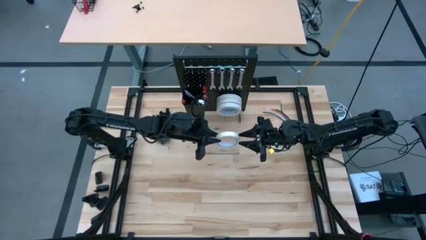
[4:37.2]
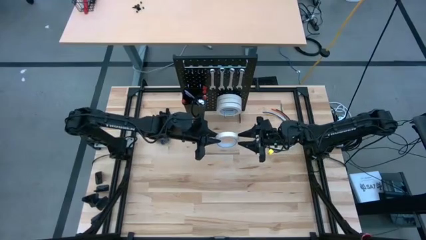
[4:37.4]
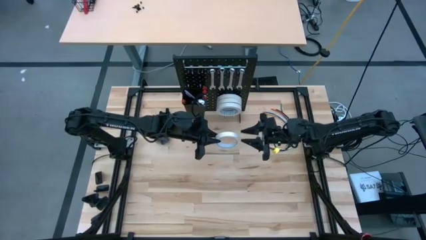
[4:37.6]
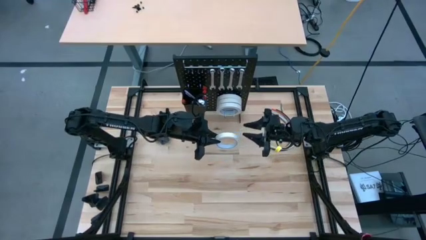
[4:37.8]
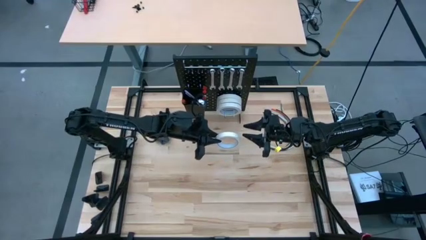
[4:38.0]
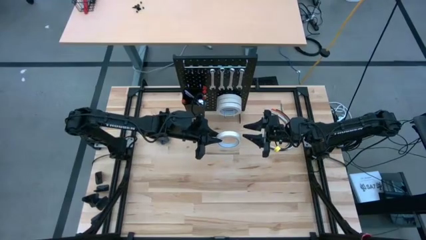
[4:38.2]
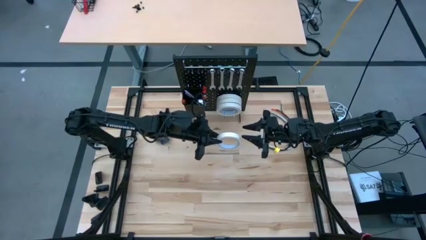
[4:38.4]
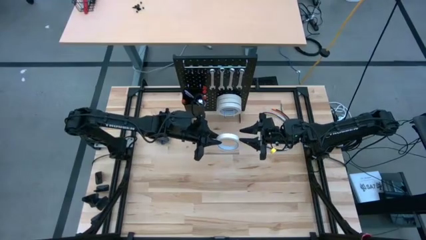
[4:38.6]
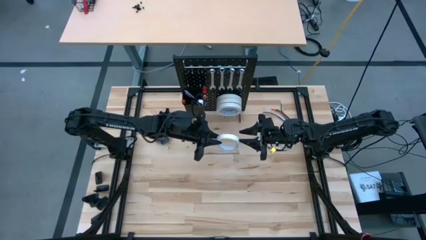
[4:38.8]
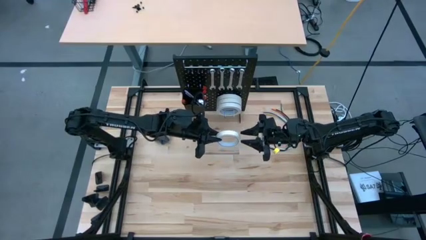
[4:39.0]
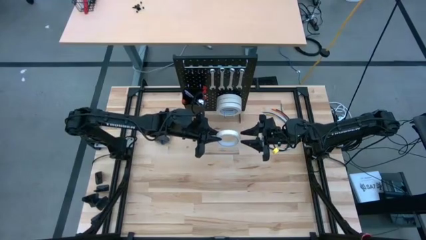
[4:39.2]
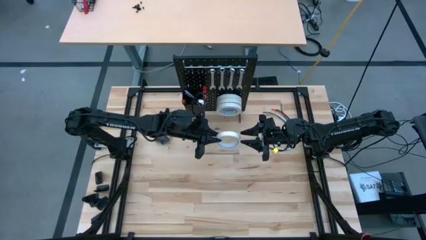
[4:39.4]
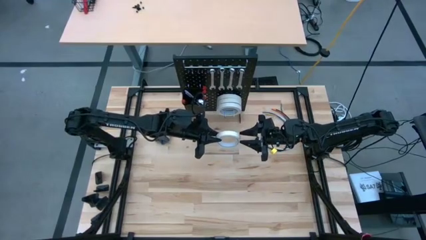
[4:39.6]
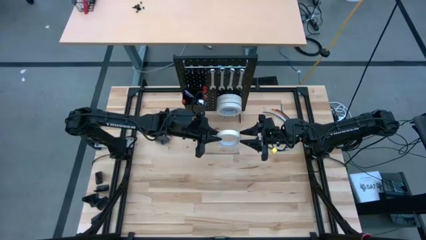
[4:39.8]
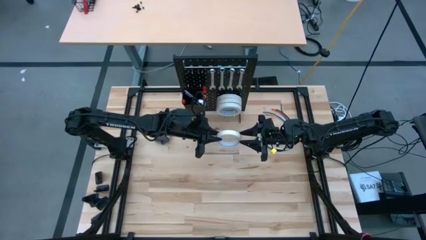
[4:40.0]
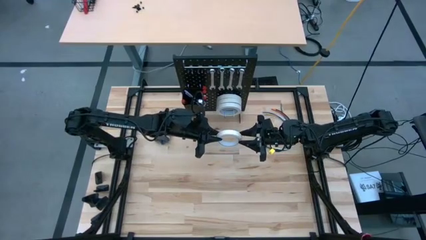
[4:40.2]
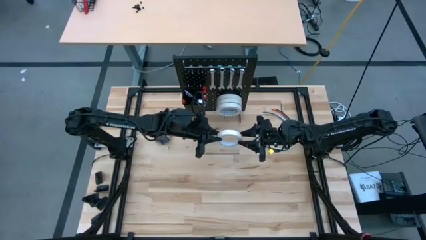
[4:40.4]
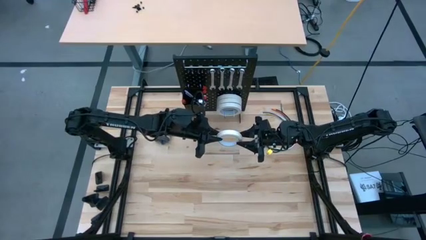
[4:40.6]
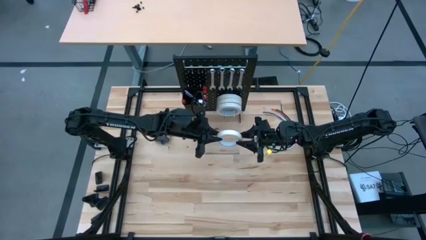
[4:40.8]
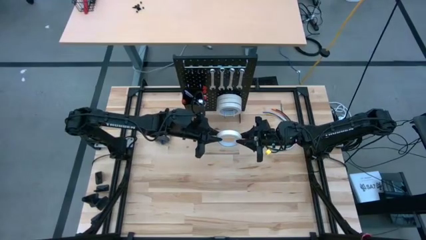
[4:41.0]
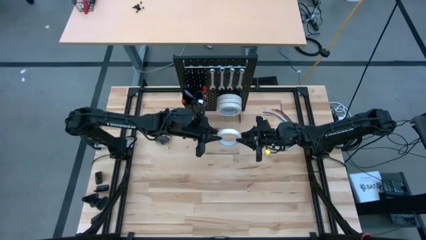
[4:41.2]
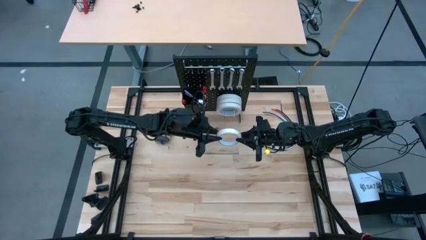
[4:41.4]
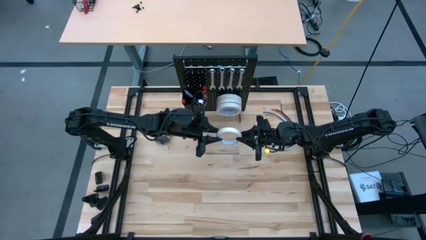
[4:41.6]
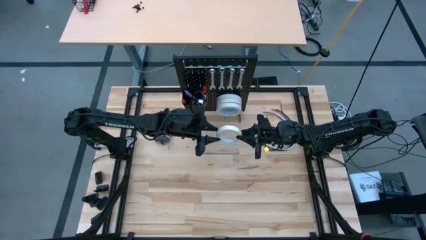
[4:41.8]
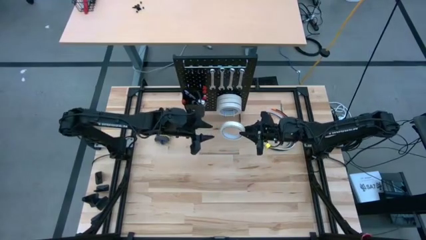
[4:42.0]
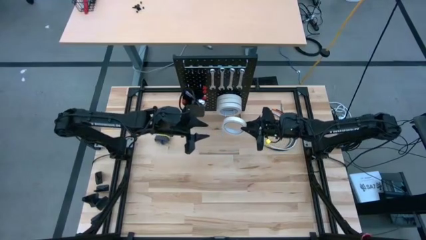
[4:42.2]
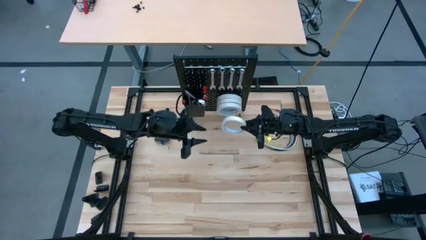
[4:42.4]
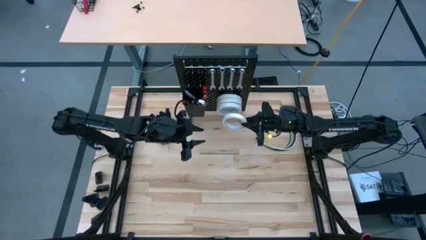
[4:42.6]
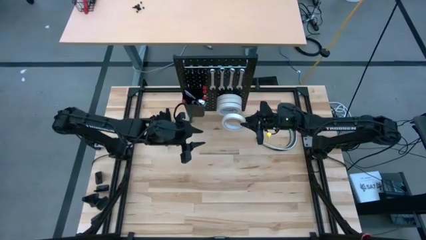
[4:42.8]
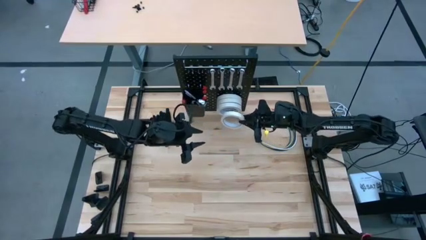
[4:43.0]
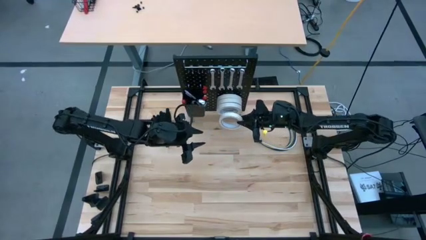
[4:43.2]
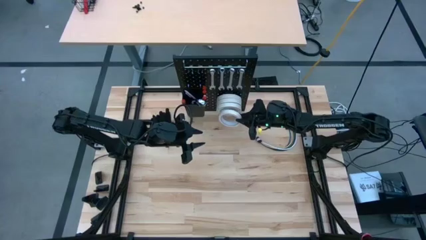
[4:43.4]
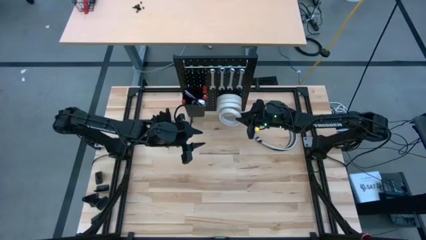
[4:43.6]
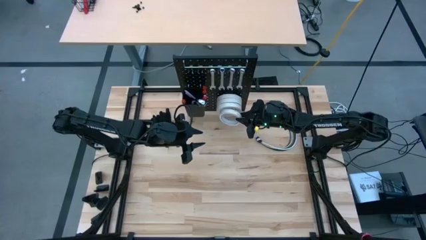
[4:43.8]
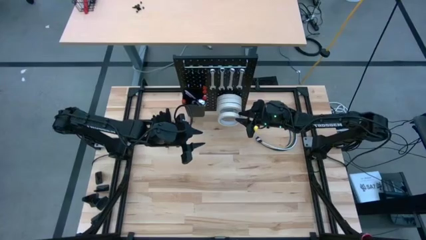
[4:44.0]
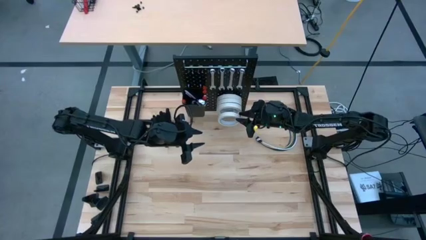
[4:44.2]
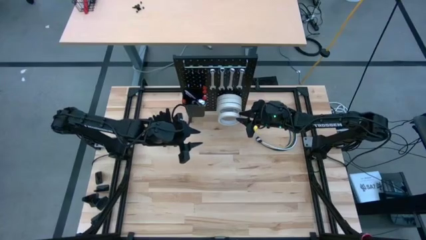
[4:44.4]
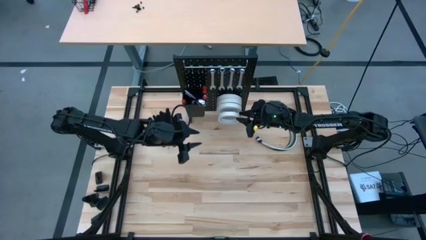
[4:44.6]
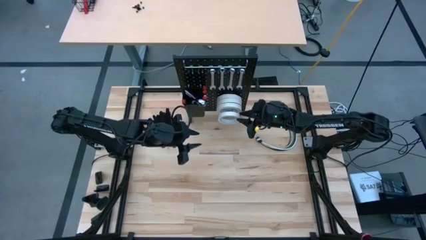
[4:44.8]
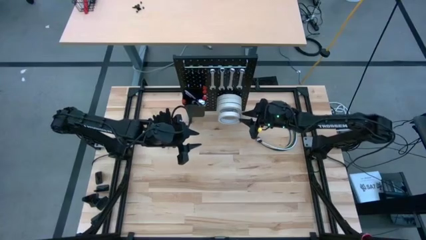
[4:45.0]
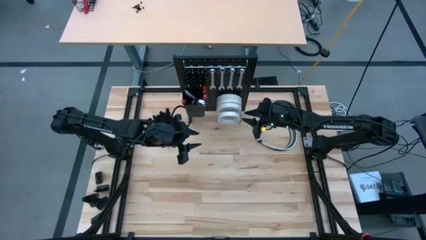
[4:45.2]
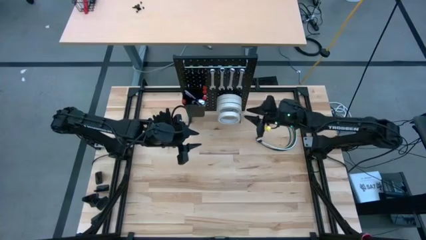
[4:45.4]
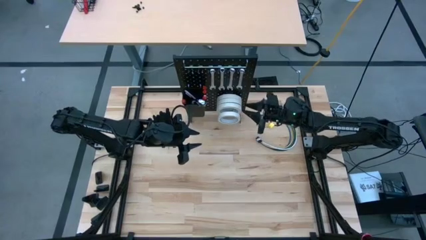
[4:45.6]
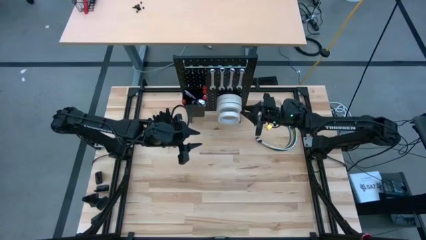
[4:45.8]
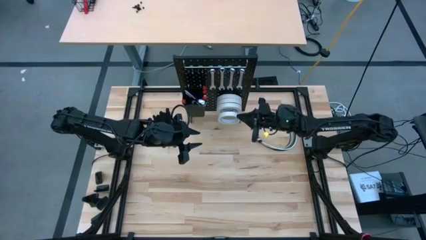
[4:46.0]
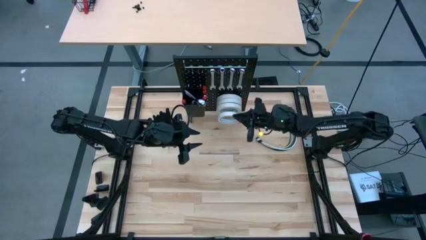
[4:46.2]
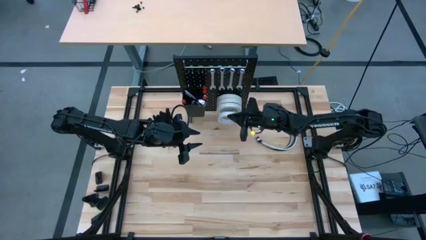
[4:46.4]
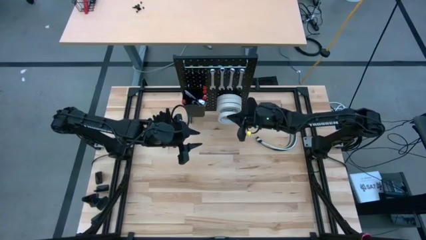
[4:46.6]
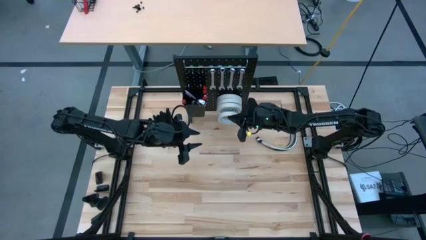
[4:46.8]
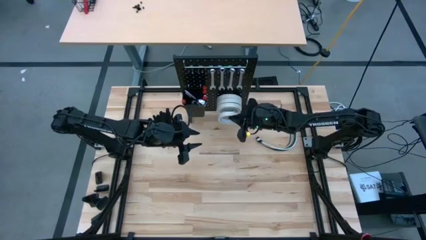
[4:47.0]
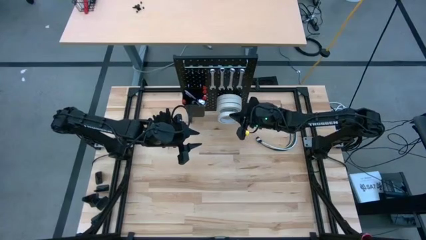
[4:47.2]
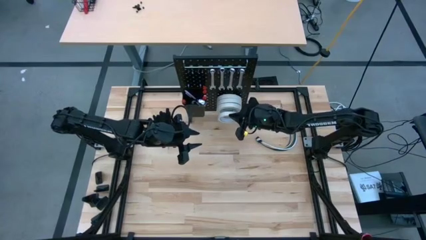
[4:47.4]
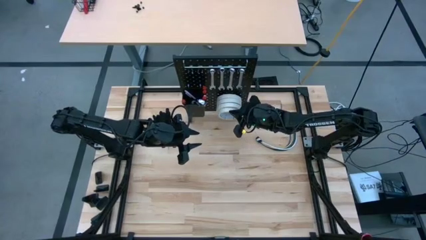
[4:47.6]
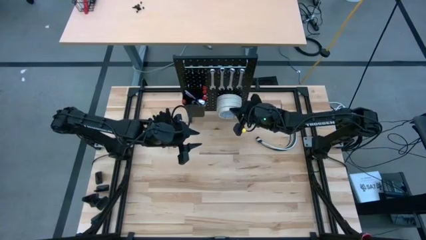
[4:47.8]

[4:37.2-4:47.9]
Task: Hang tools onto peg board
Hang the white tape on the peg board

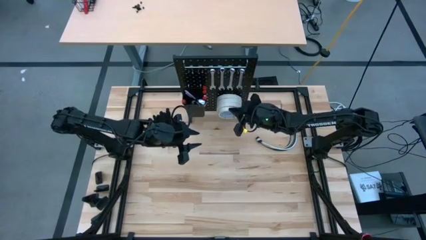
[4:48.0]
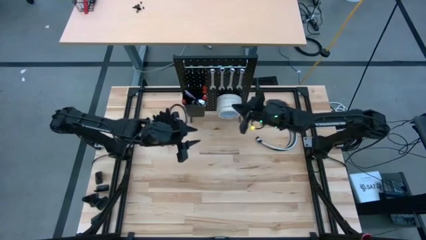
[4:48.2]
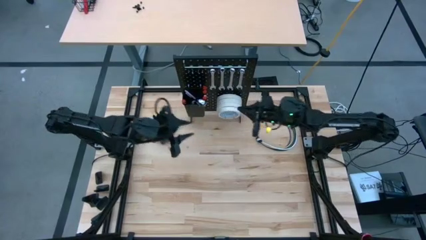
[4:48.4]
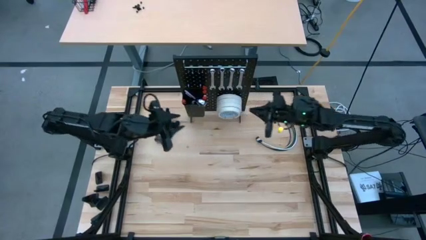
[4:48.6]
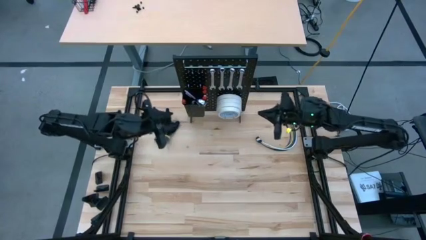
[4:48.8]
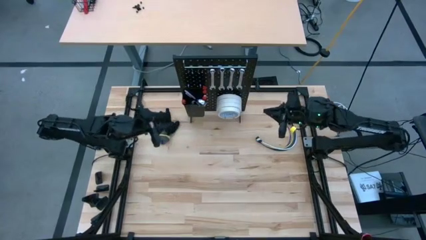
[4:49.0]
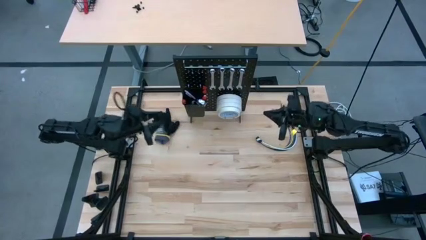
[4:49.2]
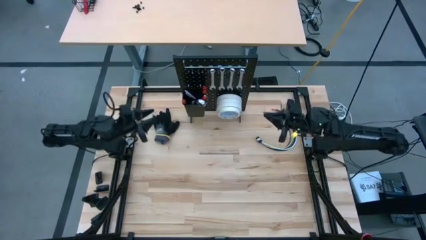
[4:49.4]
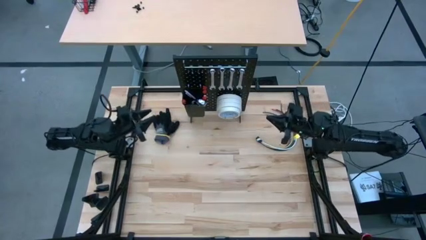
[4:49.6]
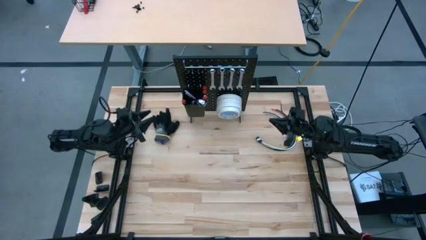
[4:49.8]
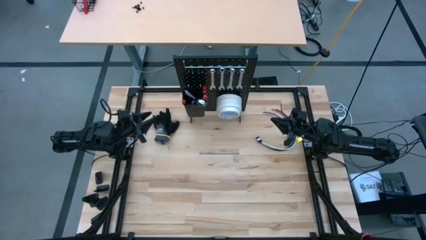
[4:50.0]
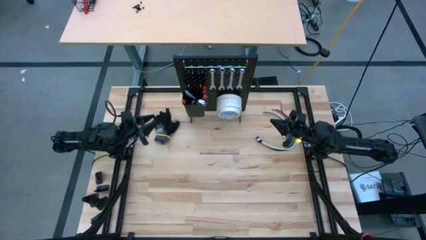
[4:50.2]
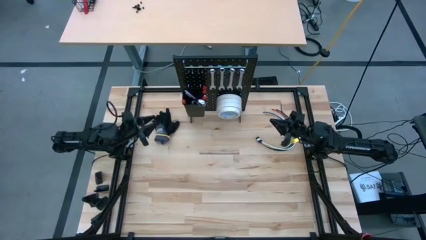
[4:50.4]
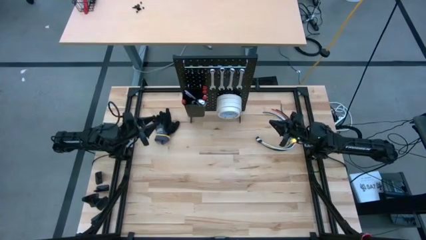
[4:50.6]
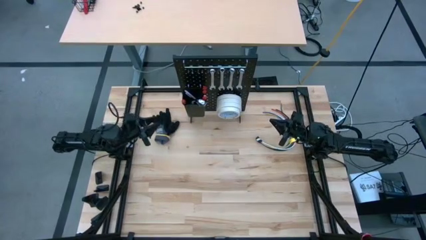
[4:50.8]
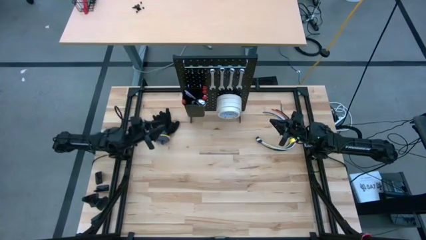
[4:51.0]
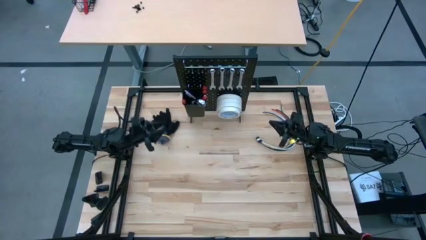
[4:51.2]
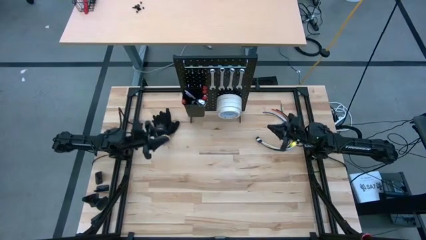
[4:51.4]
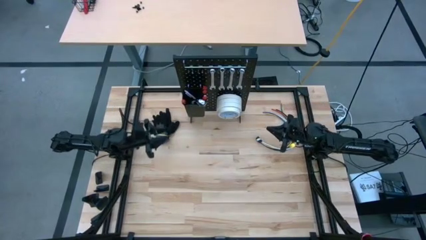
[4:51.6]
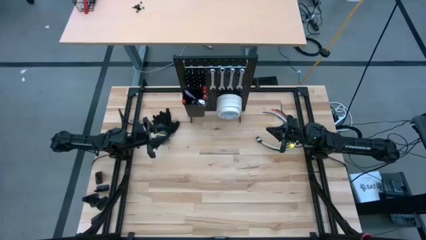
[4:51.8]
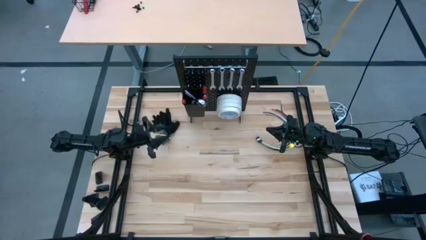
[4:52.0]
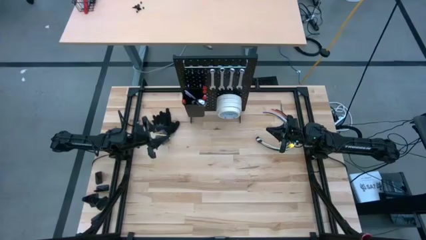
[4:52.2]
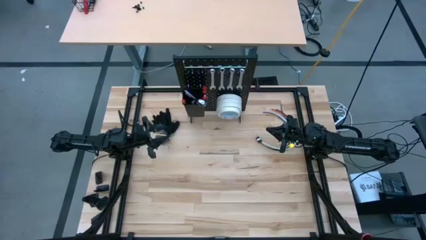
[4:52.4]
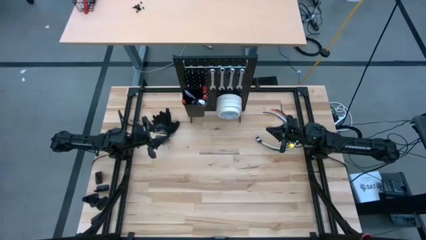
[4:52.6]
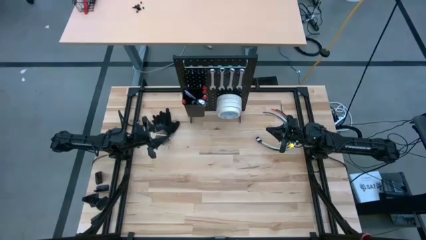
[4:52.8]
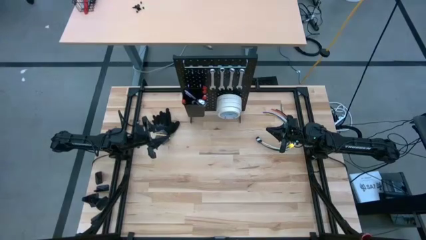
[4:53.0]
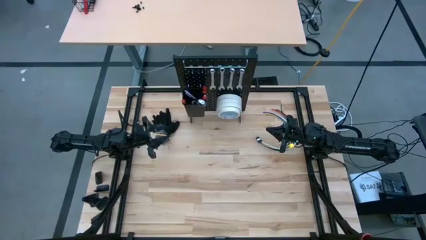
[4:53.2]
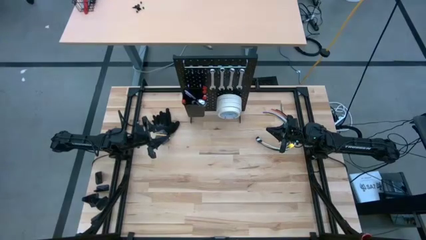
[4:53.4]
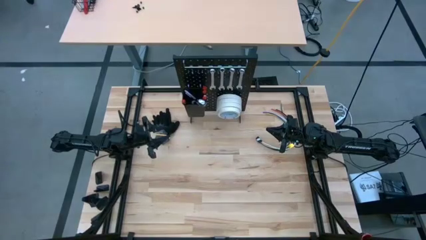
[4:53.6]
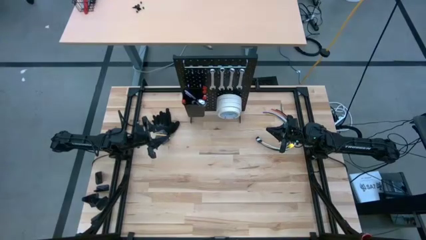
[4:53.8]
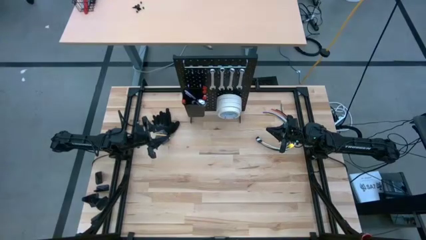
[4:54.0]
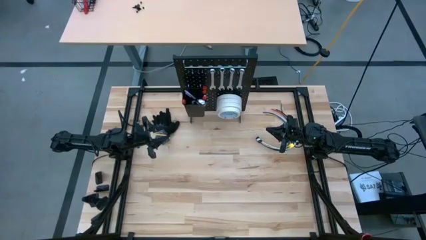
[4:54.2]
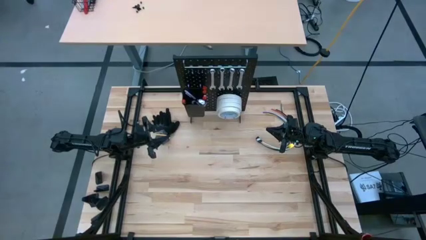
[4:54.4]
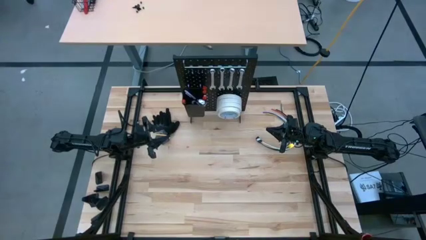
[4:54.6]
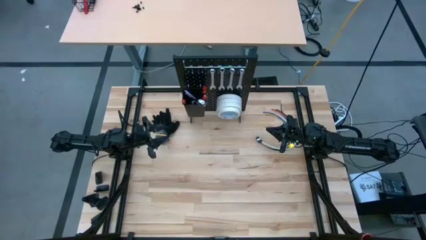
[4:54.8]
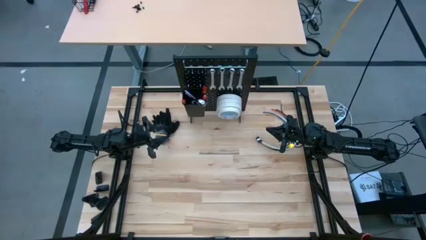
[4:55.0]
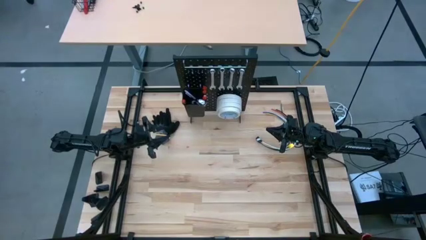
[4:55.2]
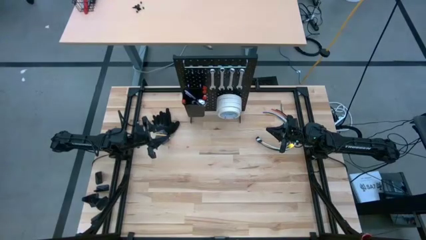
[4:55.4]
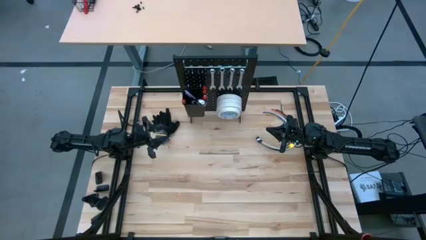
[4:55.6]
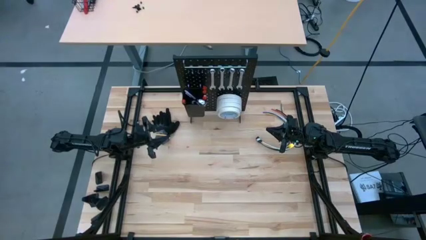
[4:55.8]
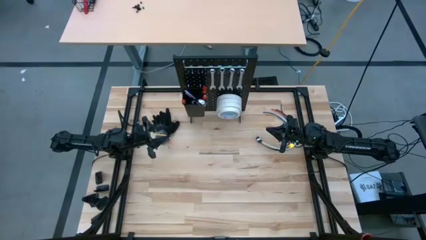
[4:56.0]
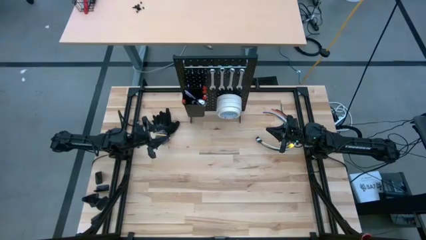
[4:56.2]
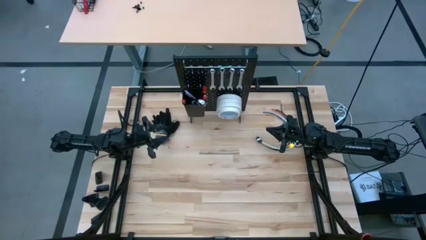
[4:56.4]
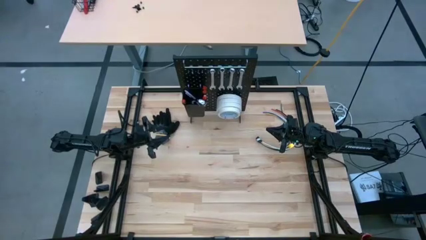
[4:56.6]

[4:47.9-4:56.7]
Return to Home Position
